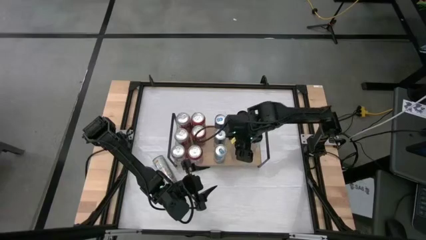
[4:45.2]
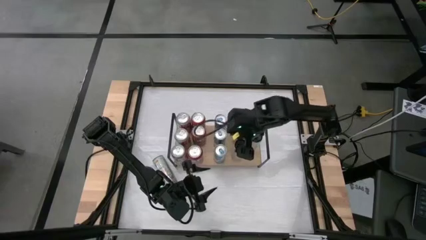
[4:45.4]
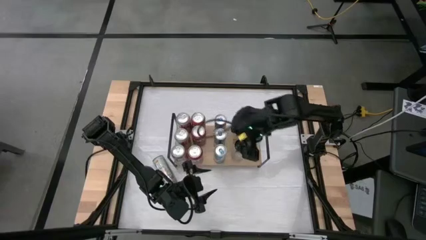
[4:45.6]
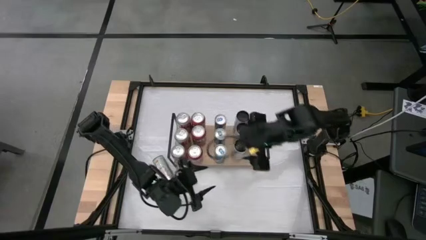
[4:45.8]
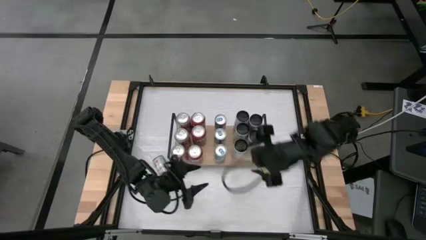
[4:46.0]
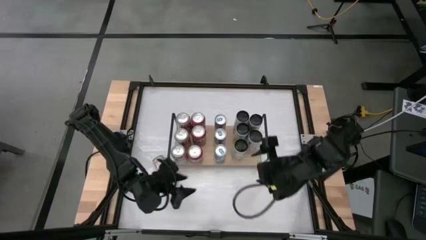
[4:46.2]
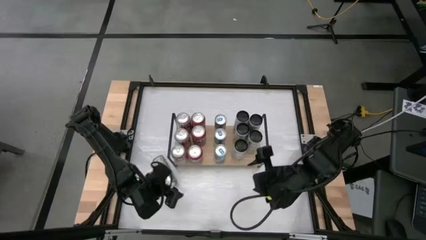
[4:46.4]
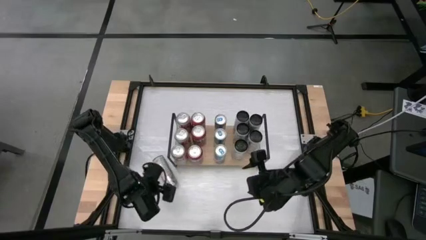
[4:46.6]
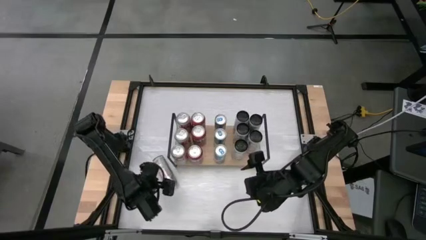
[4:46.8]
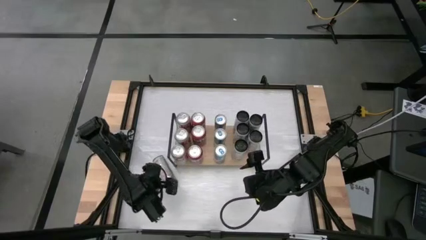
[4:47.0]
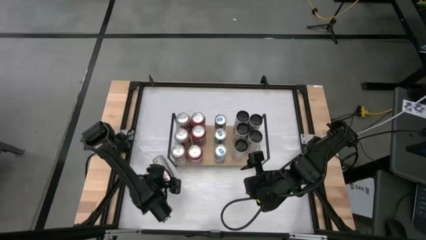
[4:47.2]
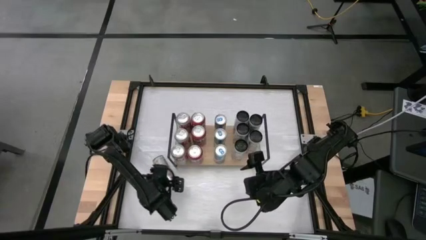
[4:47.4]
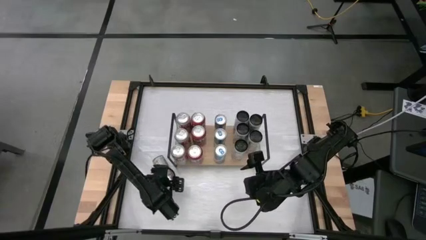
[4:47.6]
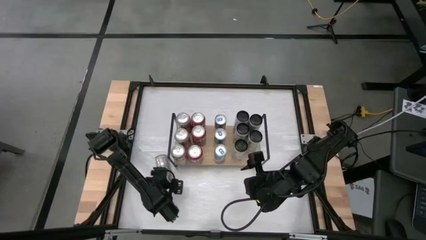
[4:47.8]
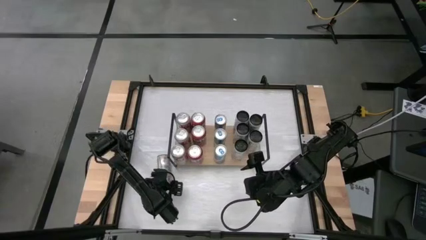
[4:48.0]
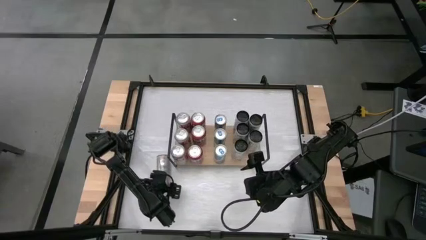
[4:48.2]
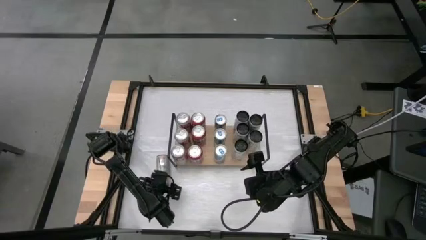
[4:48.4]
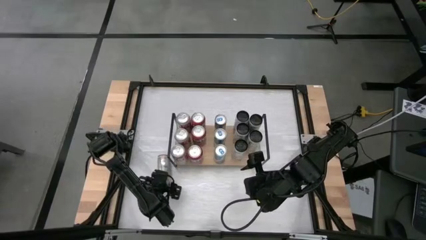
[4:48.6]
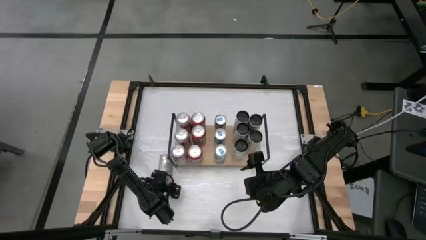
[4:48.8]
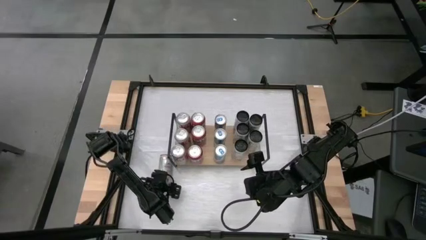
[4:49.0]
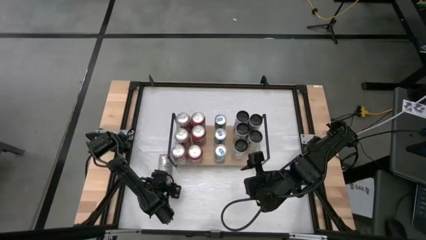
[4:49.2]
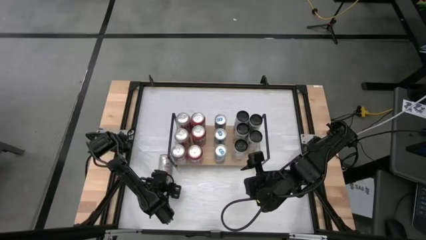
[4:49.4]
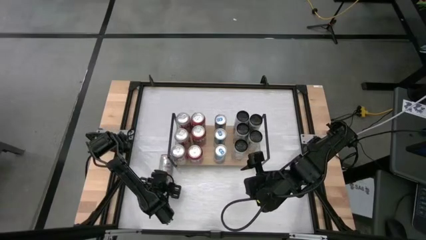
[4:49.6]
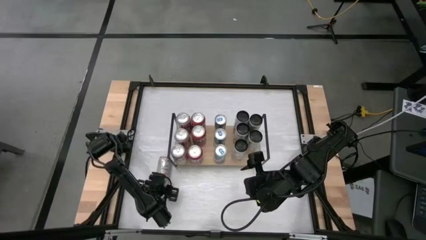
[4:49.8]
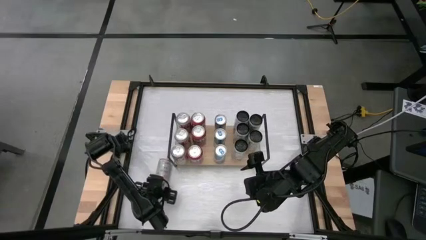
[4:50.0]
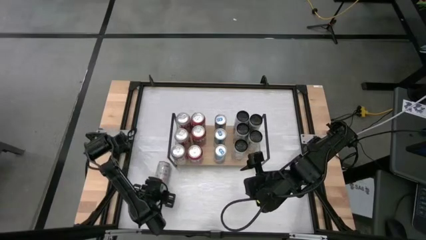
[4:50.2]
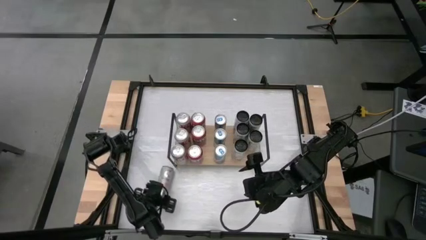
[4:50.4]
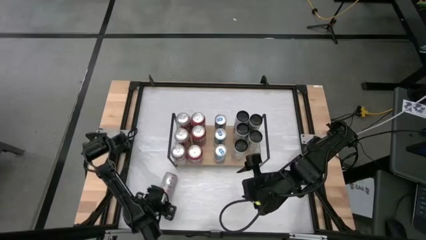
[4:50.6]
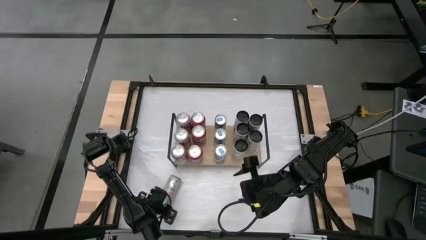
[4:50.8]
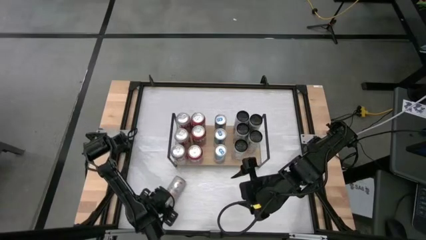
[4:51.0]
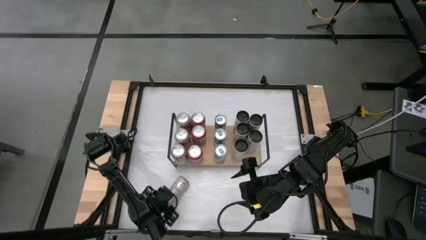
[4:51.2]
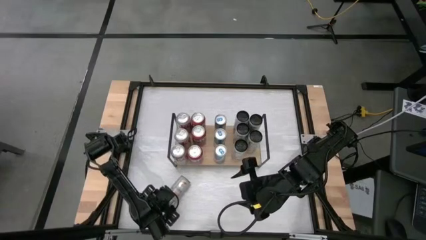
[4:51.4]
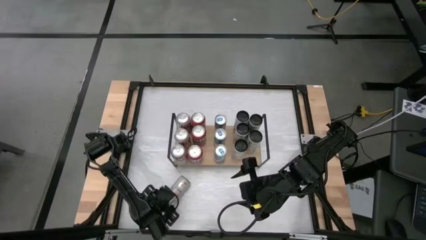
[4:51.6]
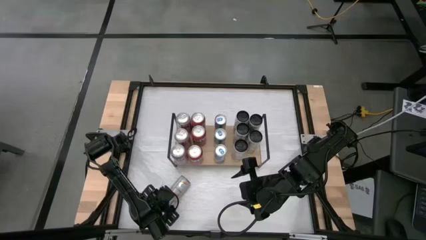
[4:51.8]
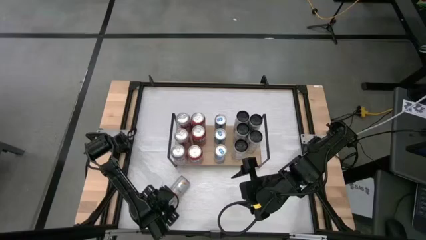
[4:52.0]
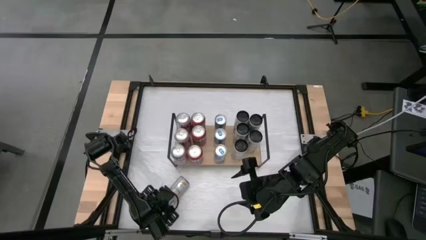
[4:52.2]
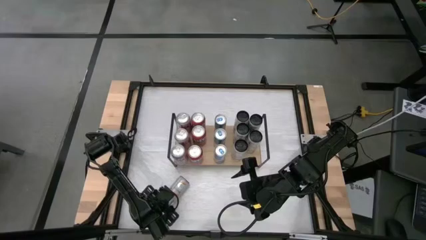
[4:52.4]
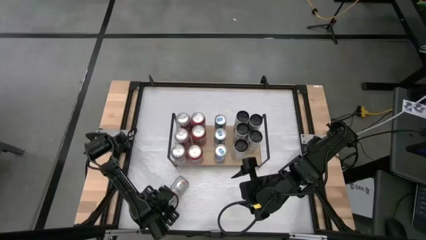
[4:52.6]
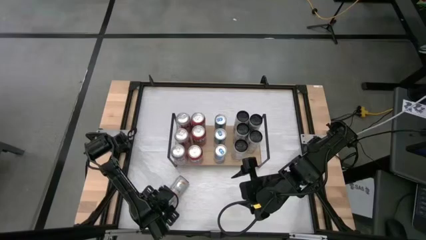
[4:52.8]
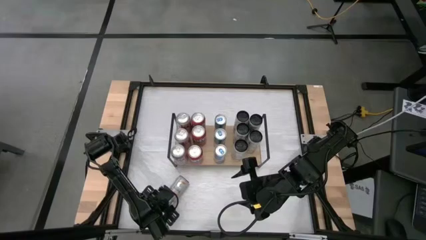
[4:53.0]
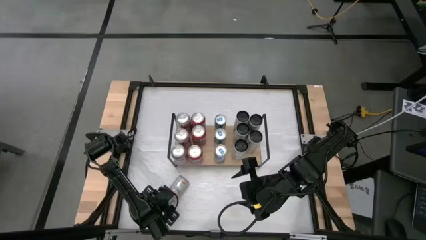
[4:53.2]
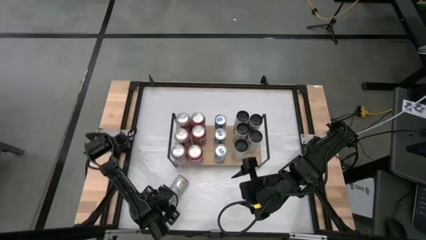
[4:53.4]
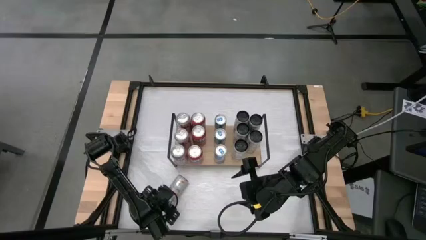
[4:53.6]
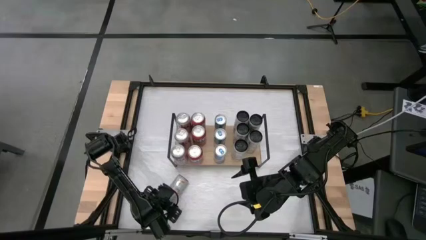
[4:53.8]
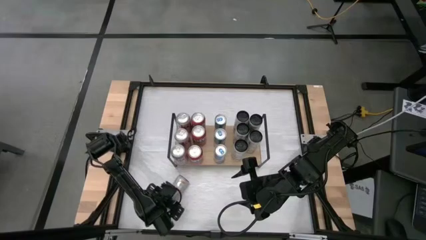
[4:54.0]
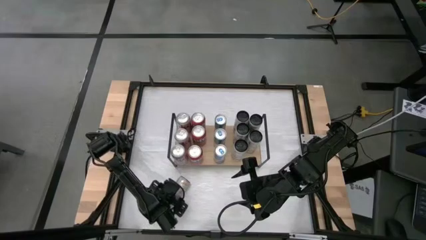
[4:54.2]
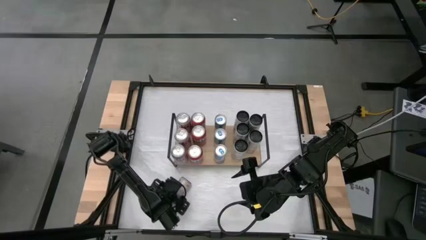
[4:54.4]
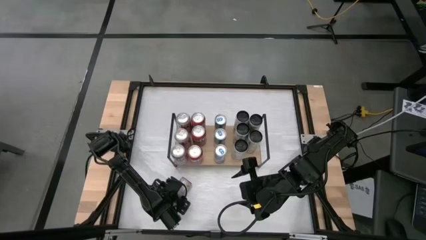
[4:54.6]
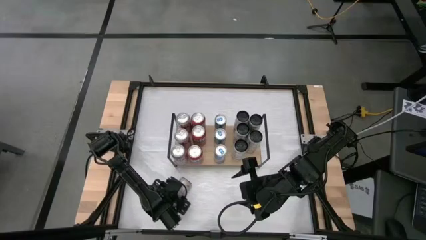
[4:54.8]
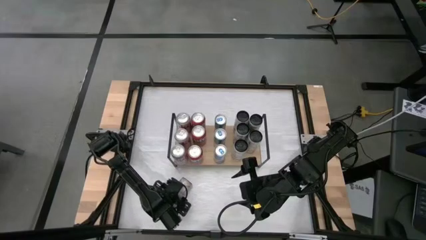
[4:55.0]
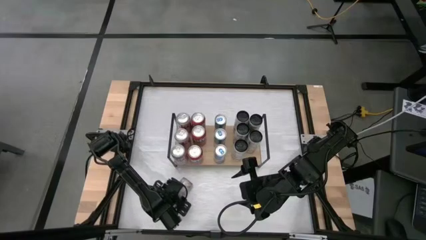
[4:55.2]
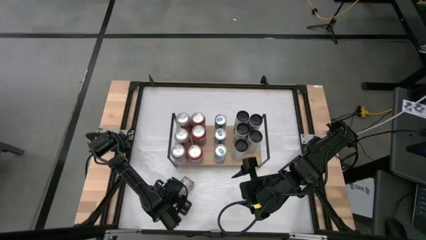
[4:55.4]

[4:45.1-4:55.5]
Task: Place canned beverage on shelf
Put the white-yellow soda can on the shelf aligned with the other white-yellow soda can
